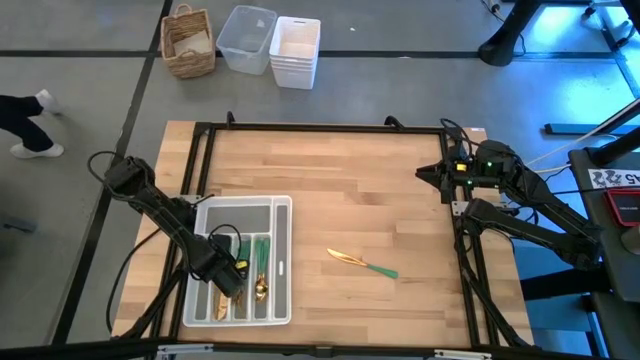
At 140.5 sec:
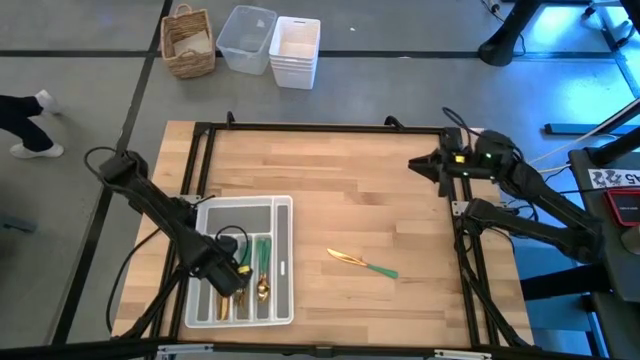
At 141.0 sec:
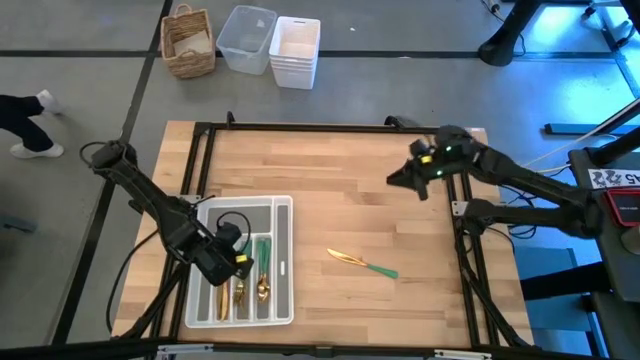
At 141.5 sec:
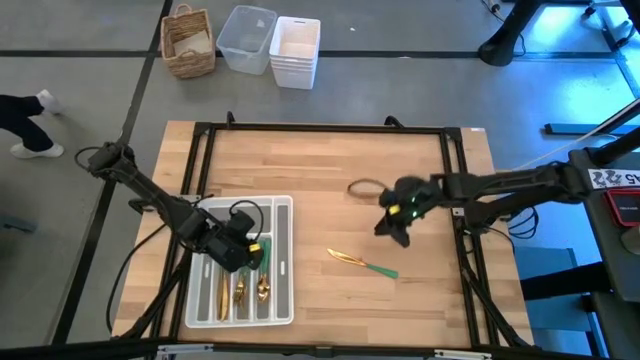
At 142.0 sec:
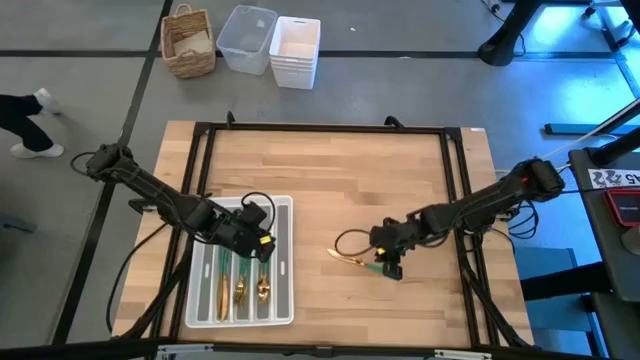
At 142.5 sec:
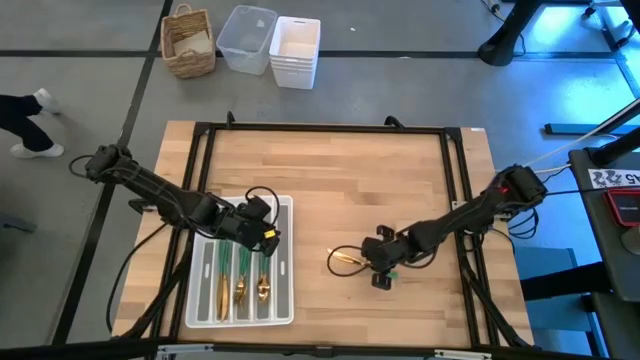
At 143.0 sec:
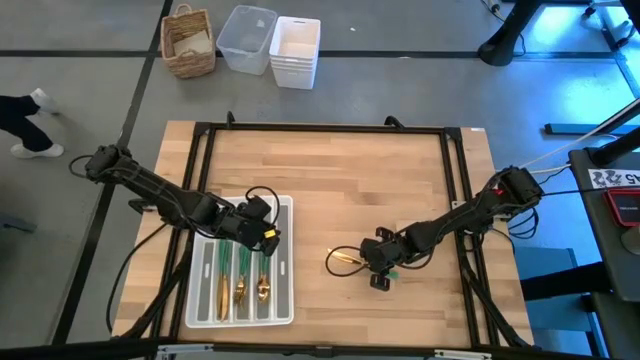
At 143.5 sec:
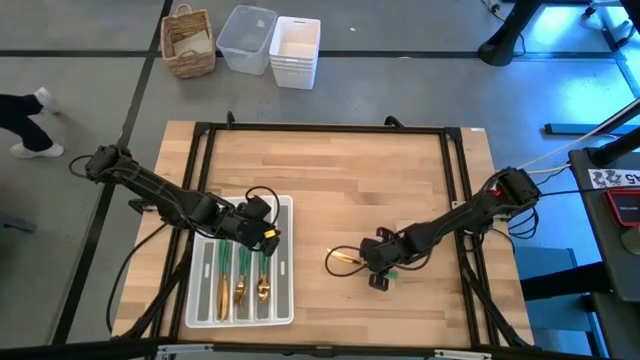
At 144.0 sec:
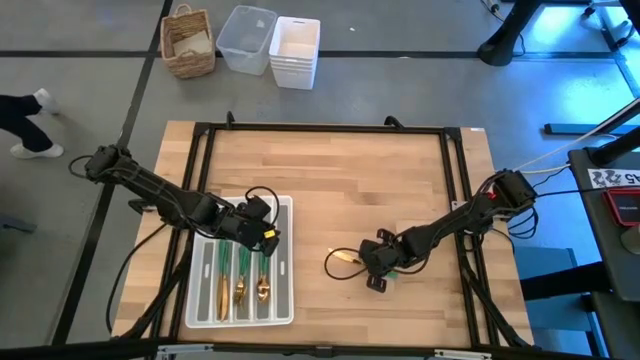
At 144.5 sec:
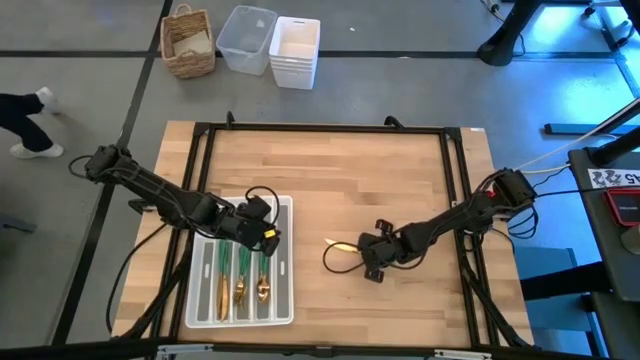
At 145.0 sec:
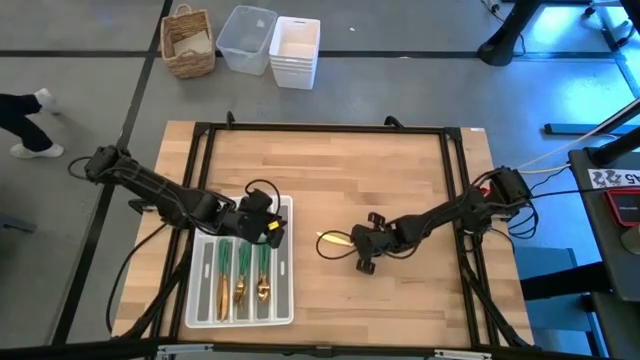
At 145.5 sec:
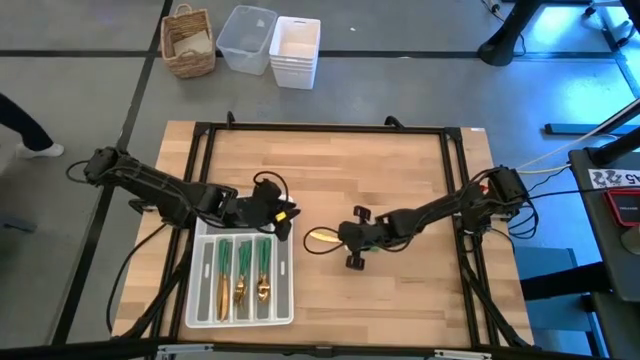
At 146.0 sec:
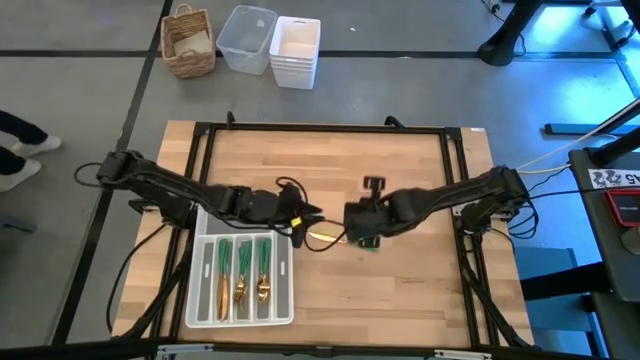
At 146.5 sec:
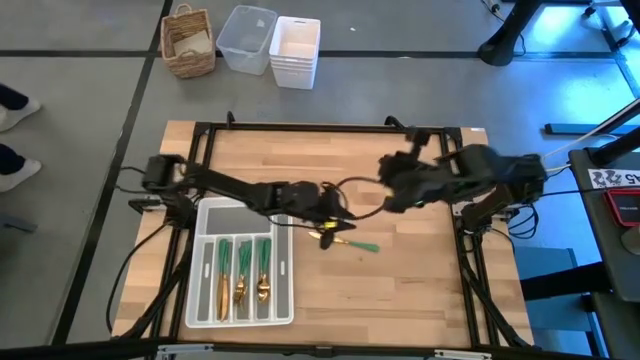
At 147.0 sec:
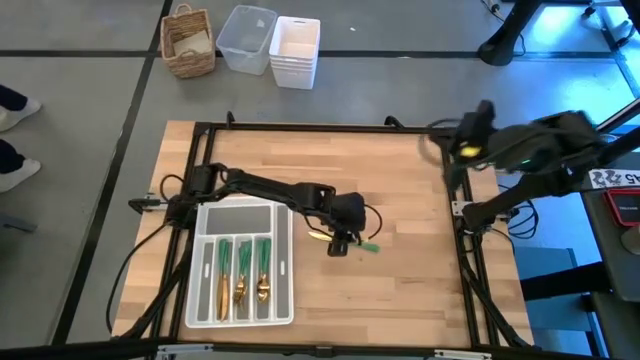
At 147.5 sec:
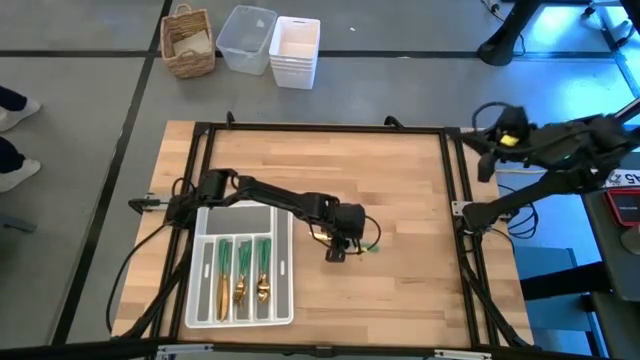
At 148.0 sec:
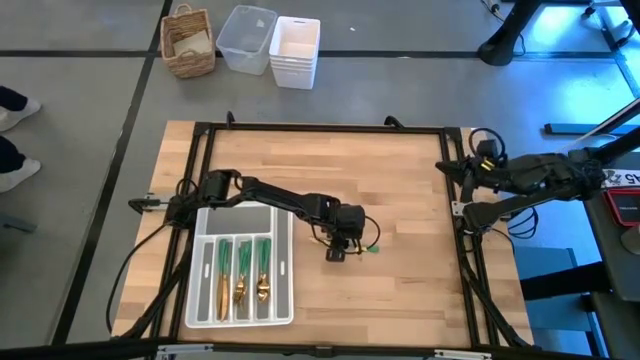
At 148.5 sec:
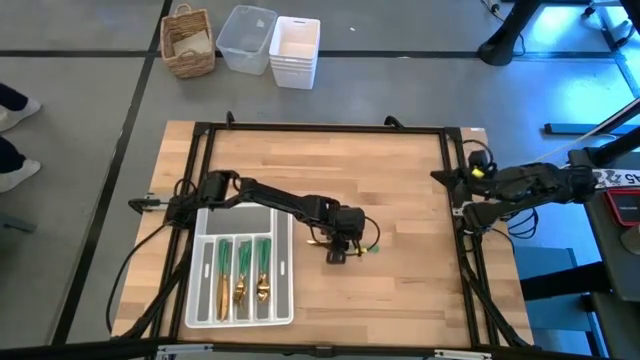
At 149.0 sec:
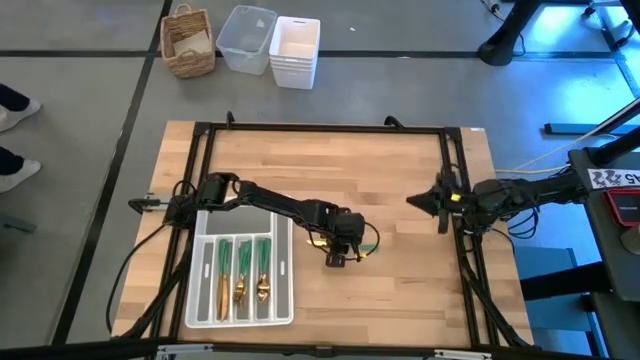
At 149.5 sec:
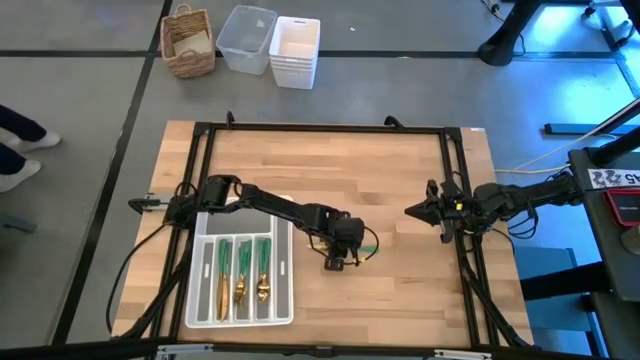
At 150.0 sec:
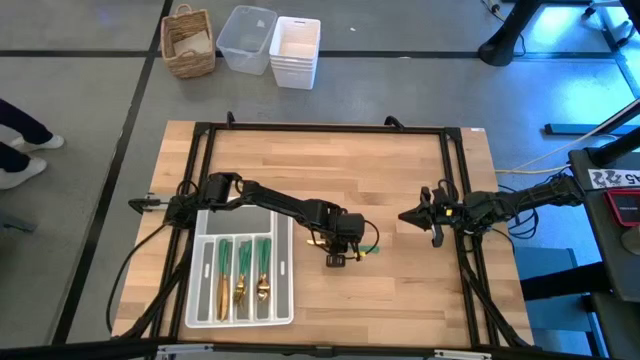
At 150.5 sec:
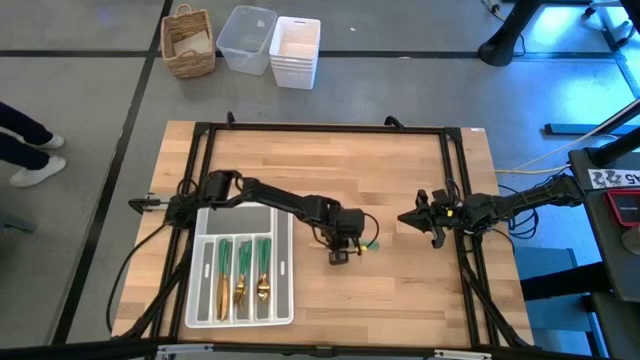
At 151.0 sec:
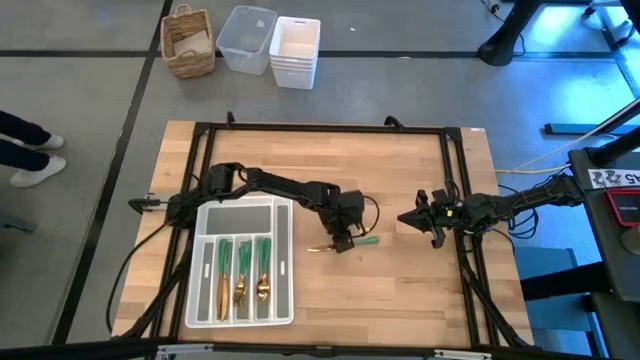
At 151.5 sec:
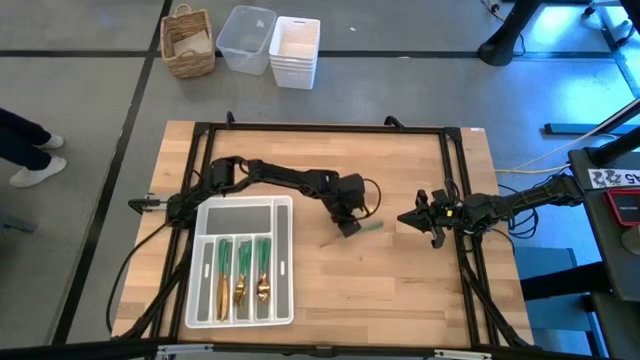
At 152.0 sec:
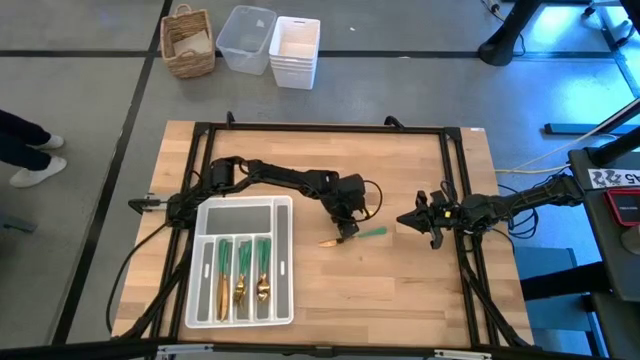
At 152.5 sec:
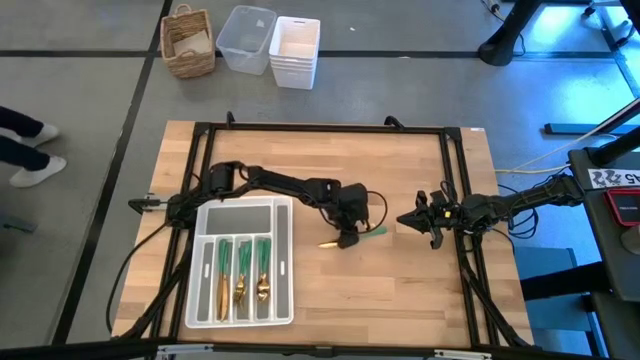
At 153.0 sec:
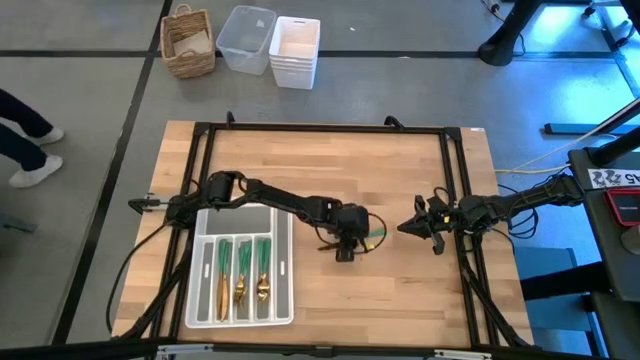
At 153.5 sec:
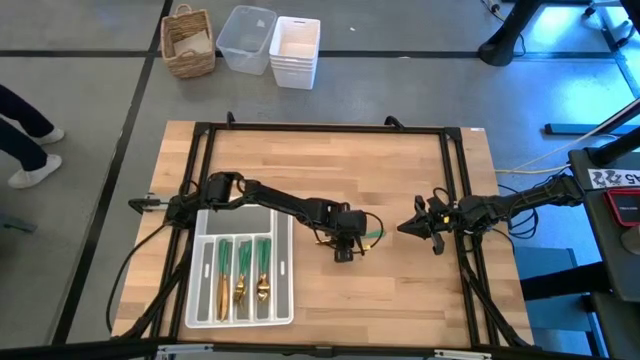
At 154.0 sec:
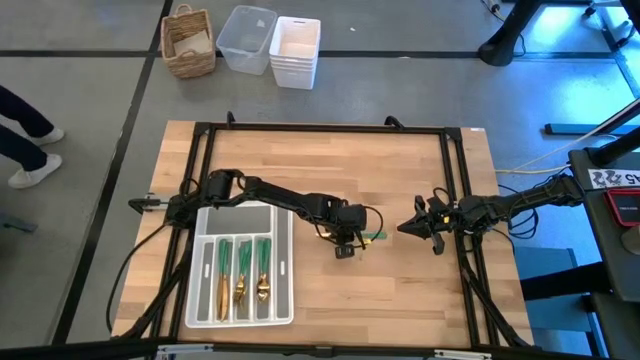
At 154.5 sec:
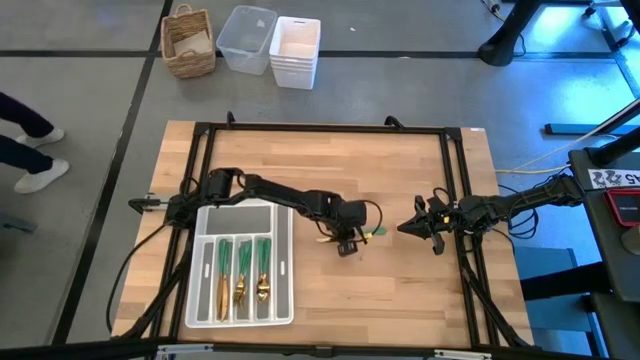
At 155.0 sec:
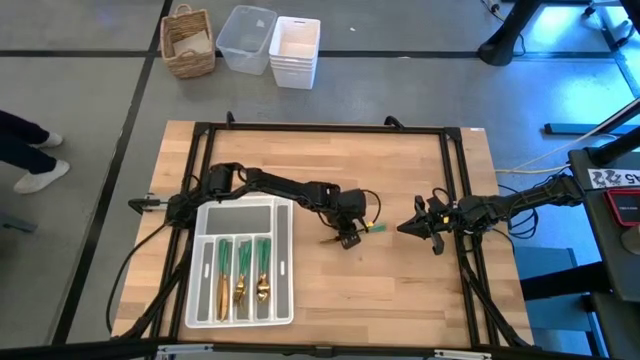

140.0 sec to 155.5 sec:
Task: Sort silverware
Put the green knife on the silverware tray

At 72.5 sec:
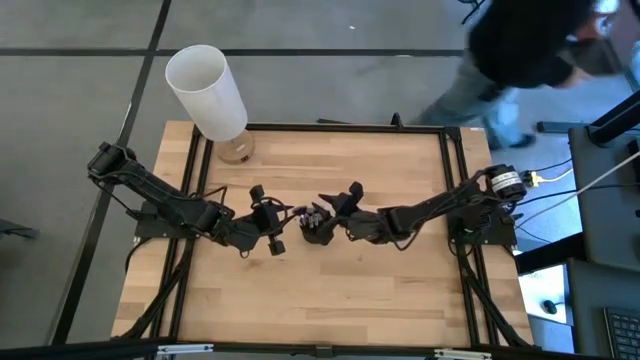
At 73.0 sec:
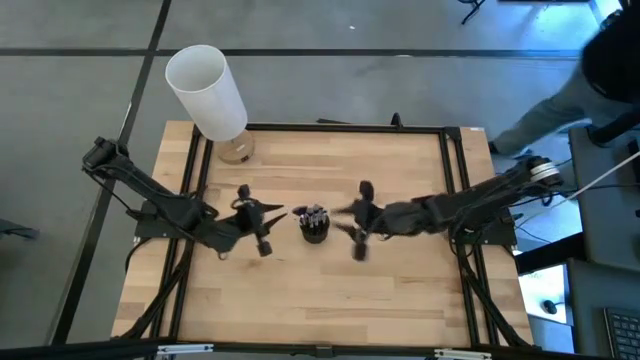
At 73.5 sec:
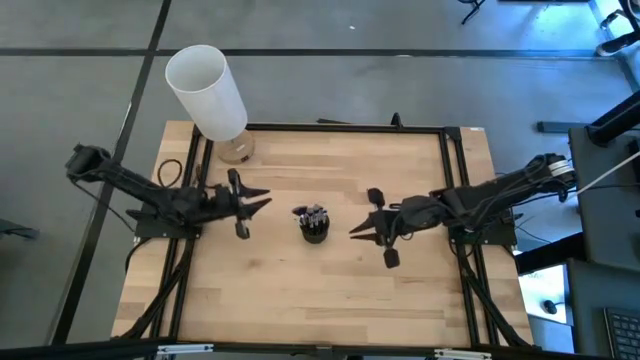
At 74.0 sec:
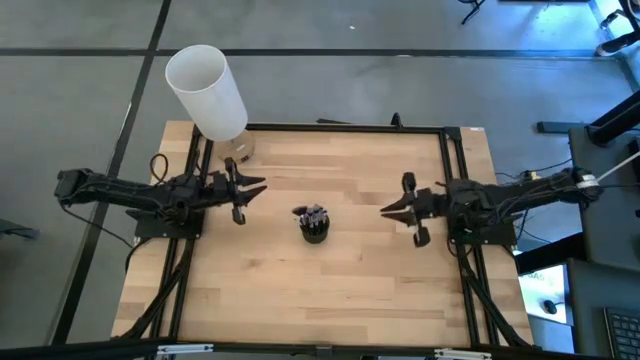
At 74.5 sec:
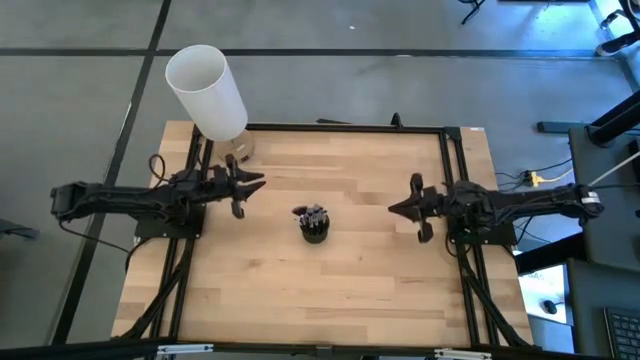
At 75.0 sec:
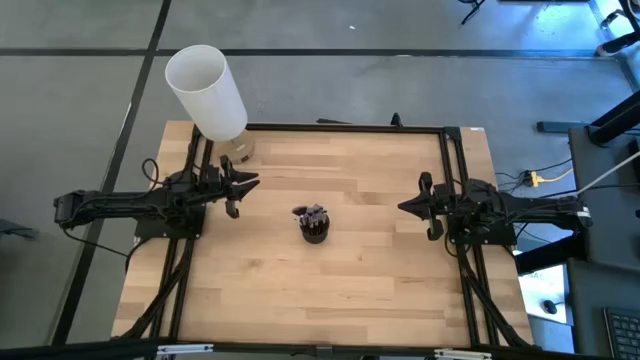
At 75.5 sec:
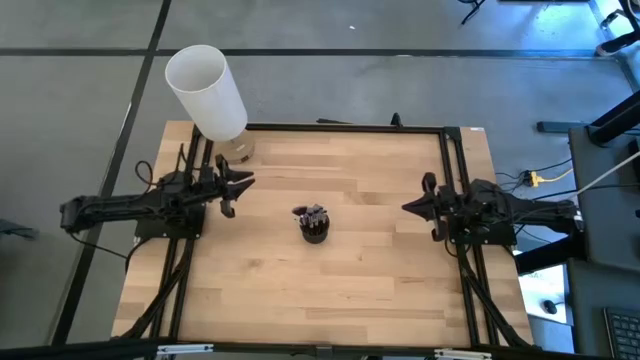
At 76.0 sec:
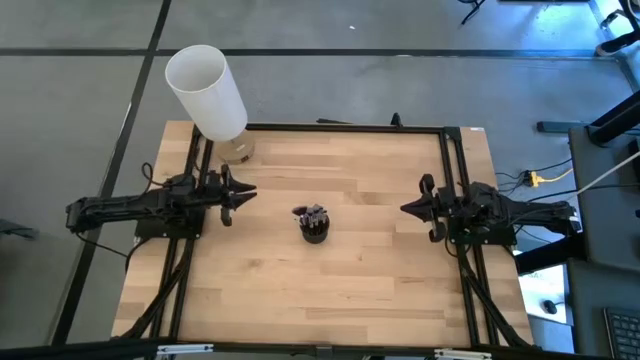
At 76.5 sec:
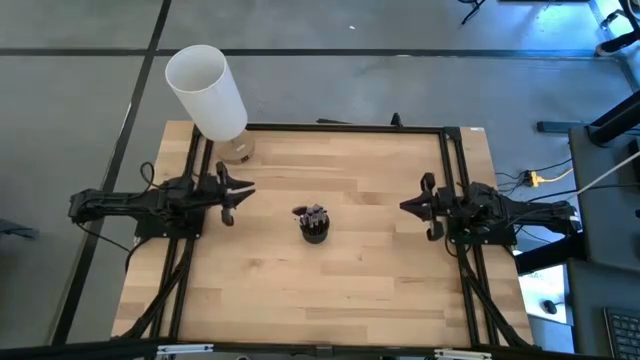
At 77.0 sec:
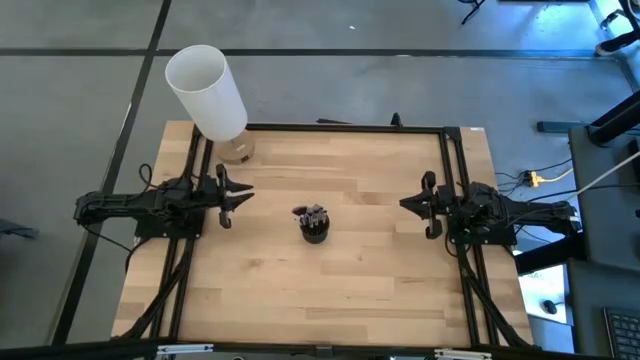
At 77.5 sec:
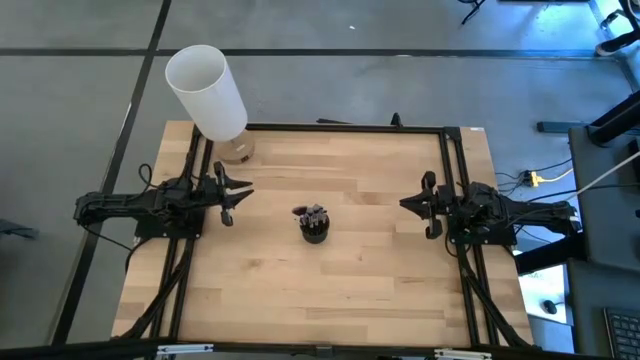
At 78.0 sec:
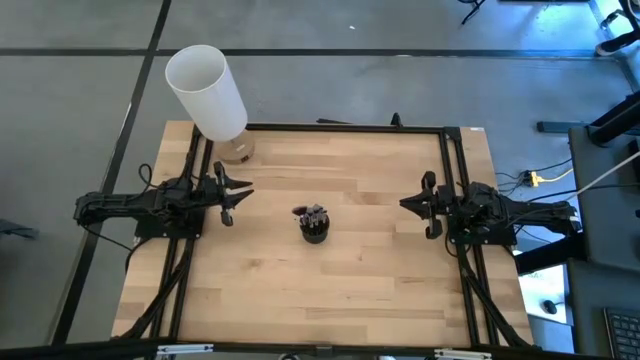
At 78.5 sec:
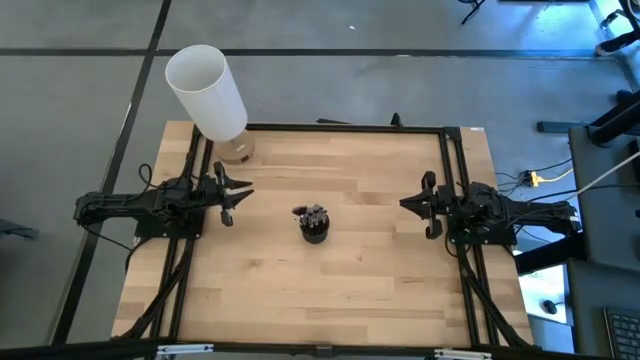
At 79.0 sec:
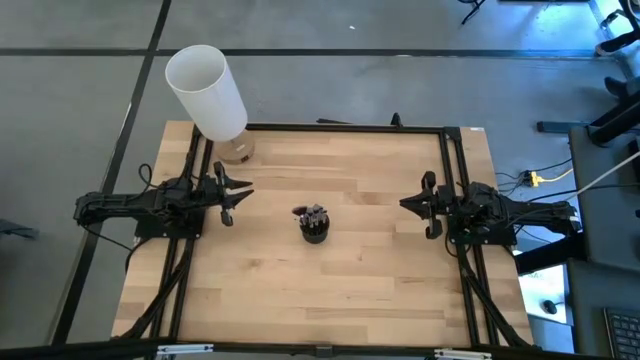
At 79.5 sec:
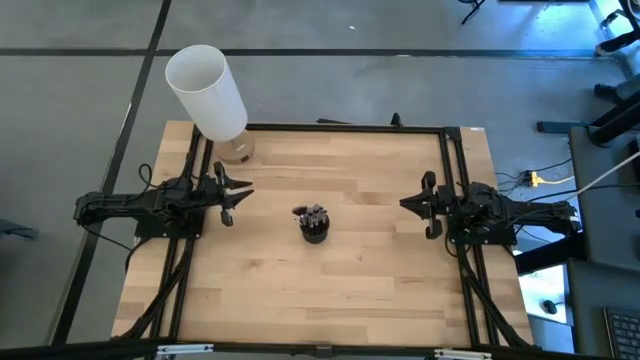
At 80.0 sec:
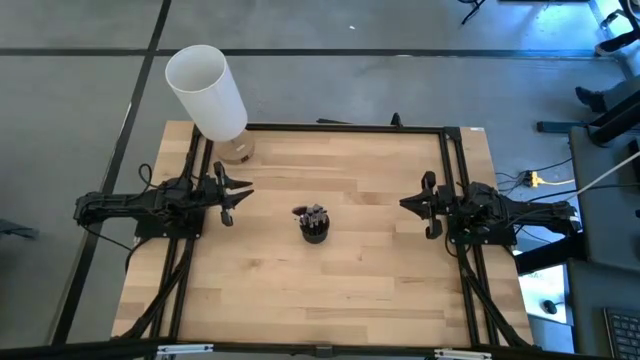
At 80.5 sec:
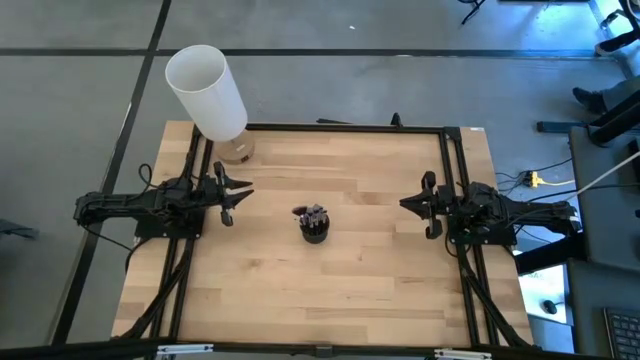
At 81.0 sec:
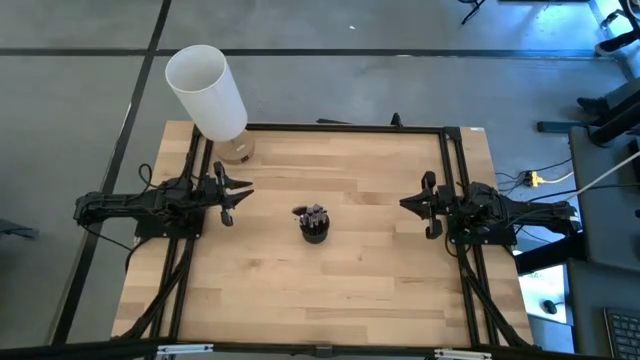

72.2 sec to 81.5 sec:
Task: Sort items
Return to Home Position
